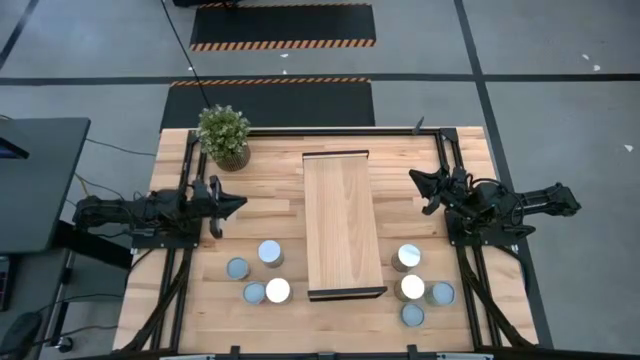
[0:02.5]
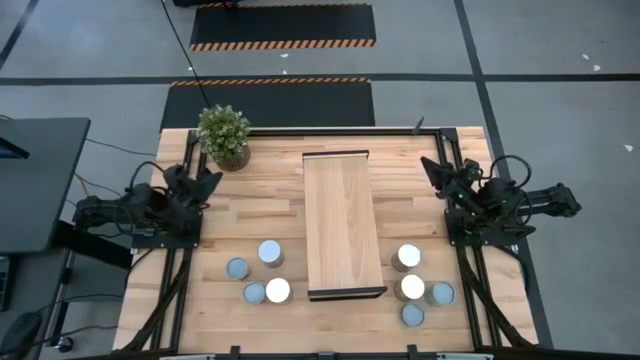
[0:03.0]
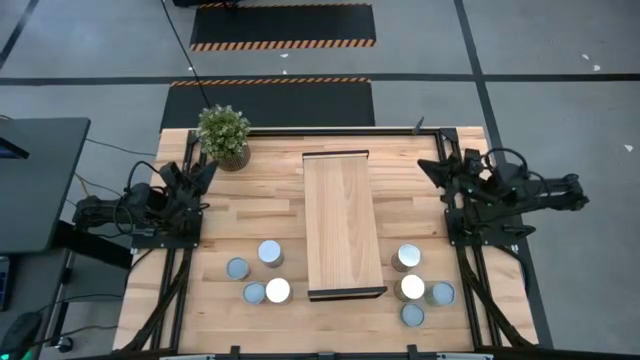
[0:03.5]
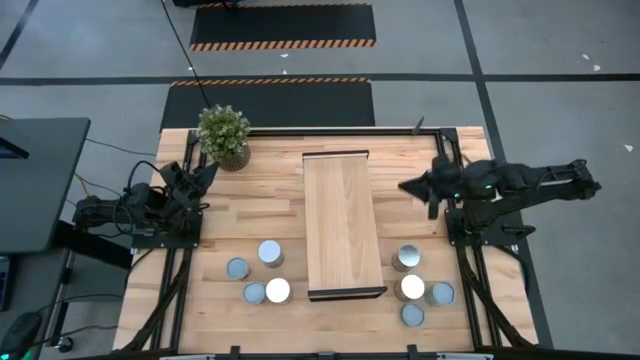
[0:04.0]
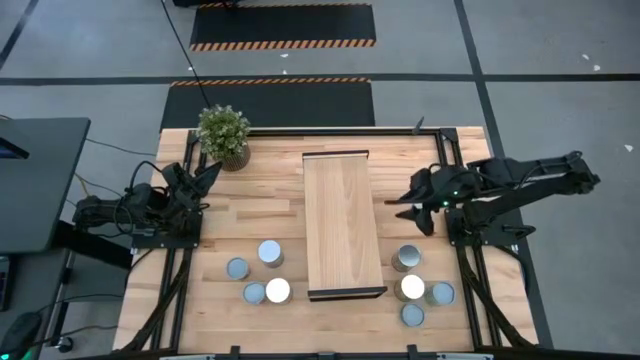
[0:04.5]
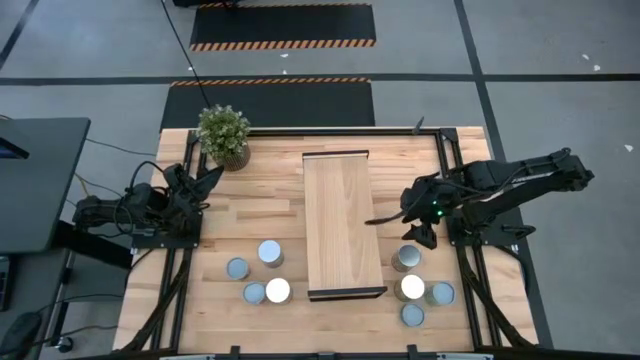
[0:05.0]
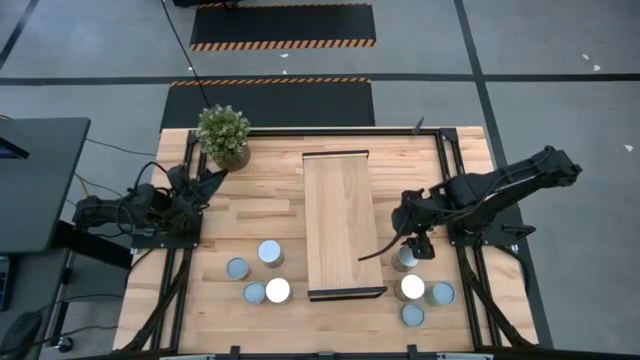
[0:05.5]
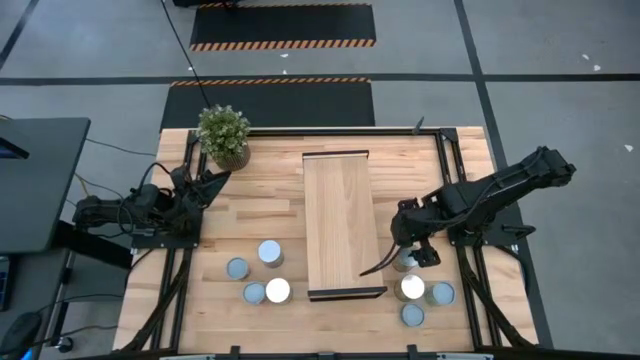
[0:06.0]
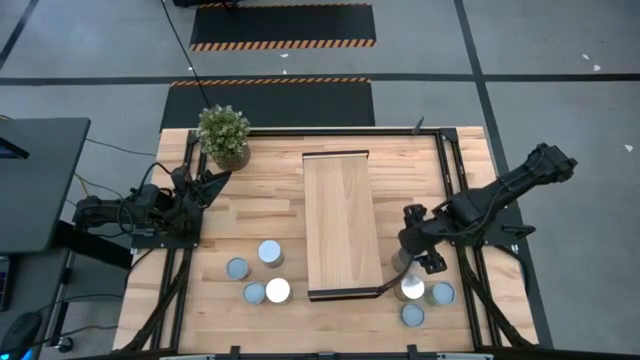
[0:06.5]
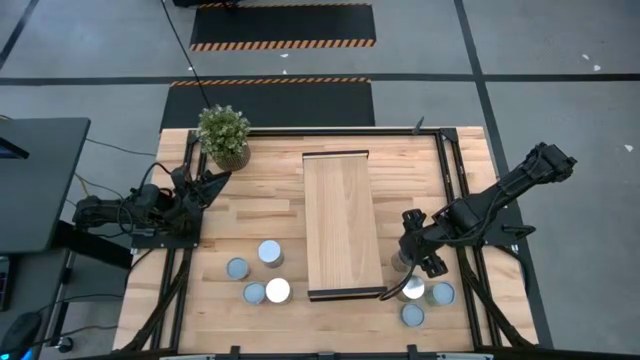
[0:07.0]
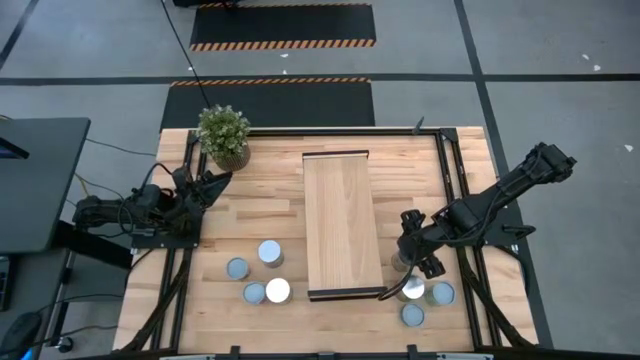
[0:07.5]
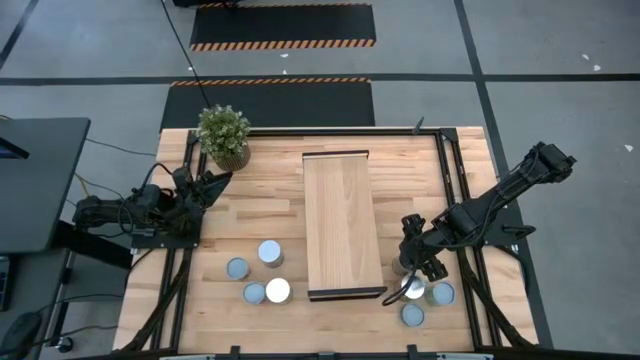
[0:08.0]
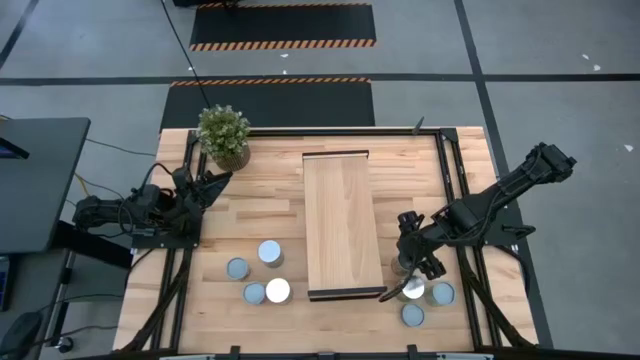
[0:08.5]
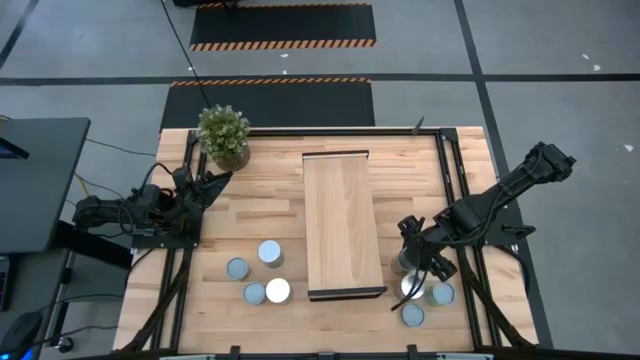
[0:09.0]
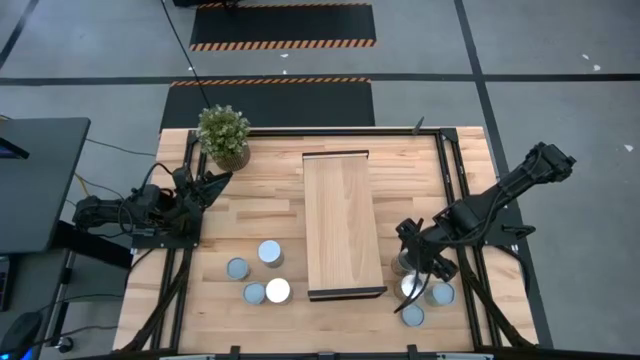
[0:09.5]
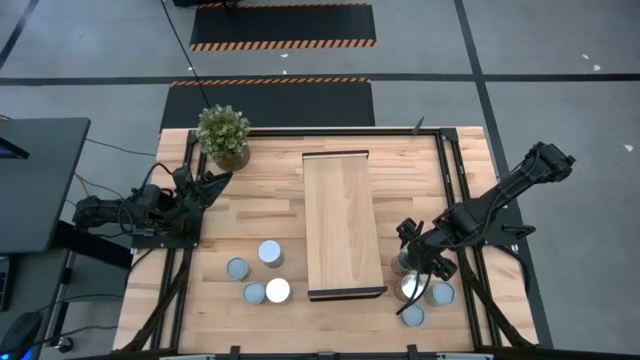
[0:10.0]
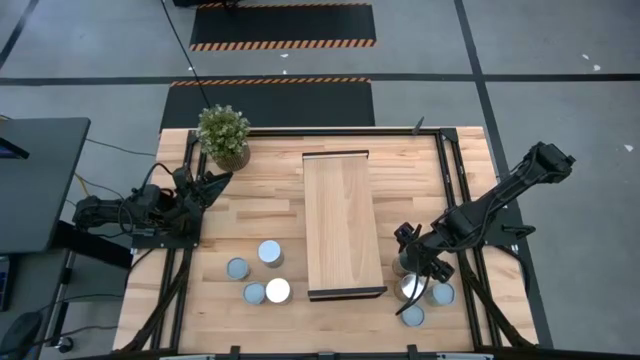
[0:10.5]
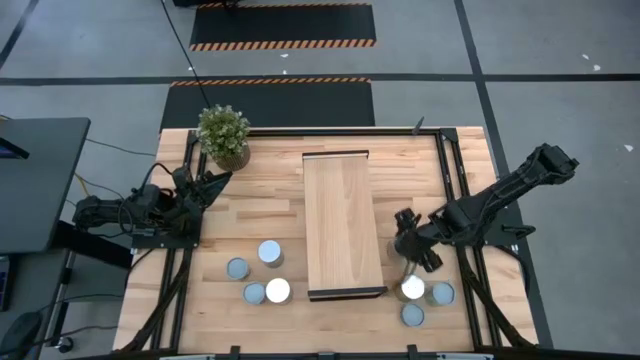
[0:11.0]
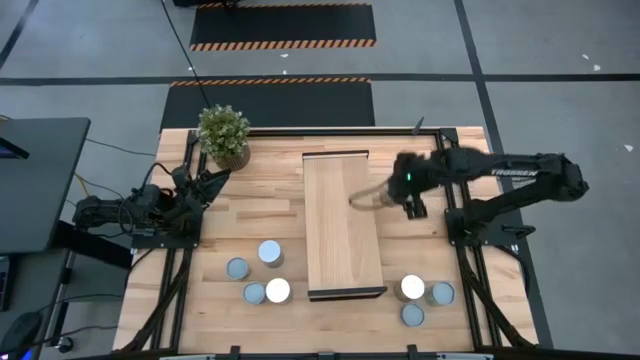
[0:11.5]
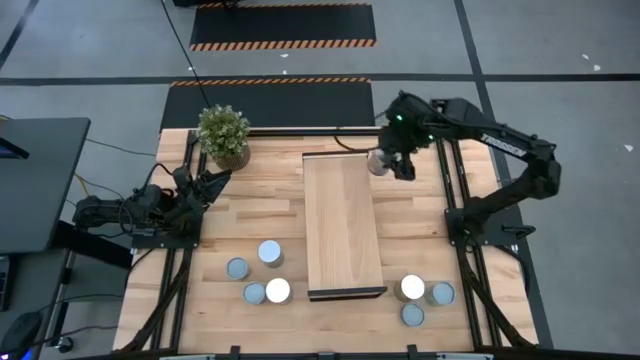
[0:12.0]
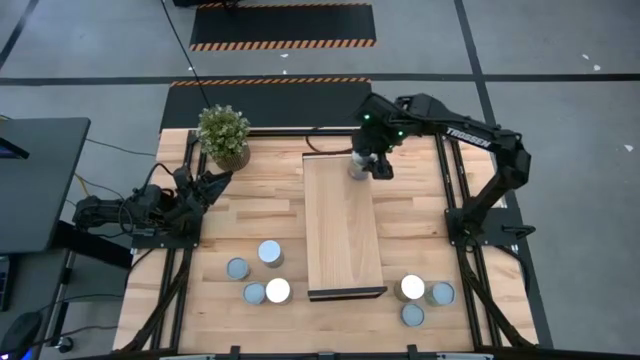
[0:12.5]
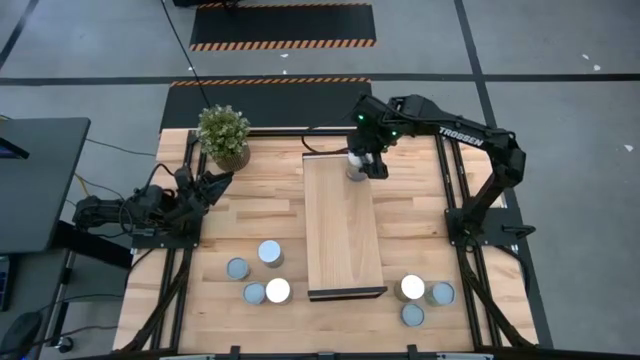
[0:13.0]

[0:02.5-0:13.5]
Task: Pick and place cans onto a shelf
Put the canned peaches on the shelf

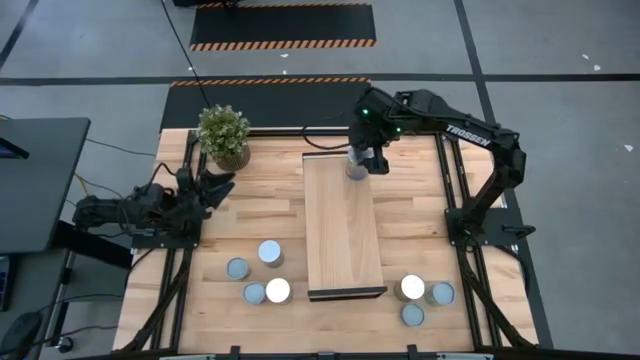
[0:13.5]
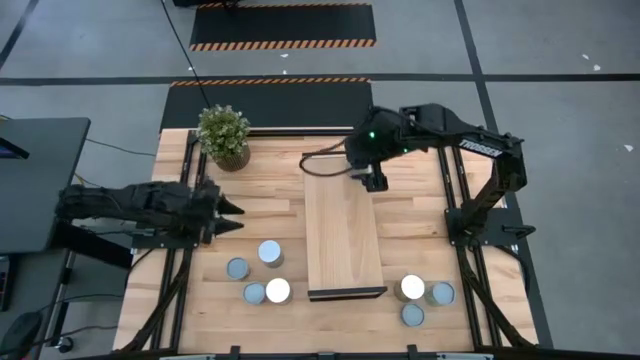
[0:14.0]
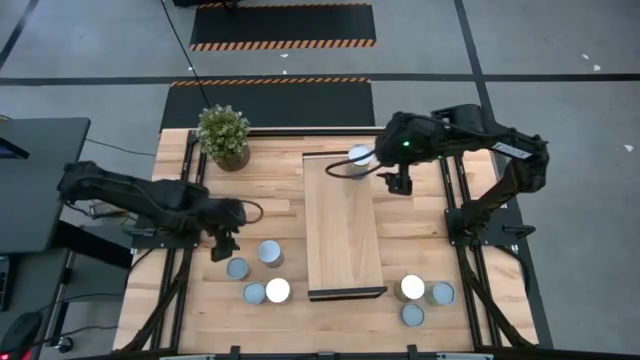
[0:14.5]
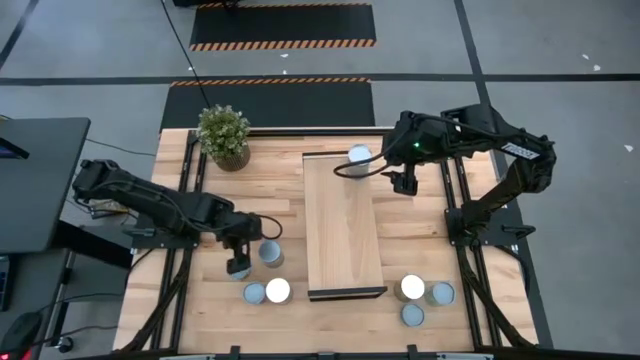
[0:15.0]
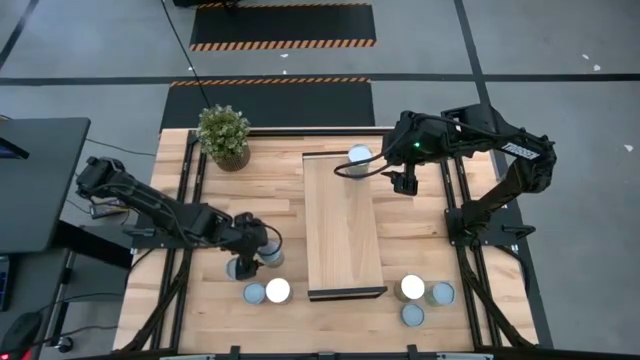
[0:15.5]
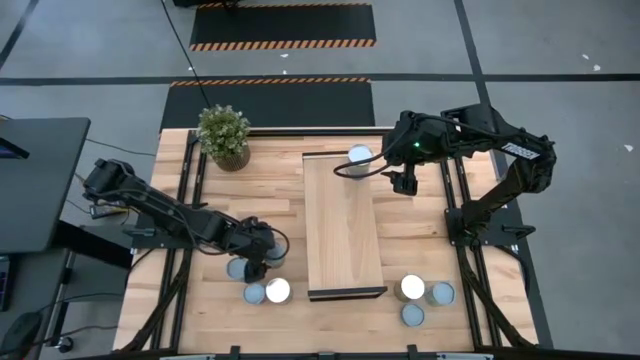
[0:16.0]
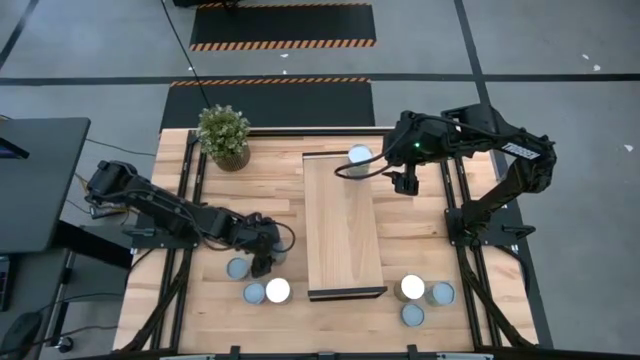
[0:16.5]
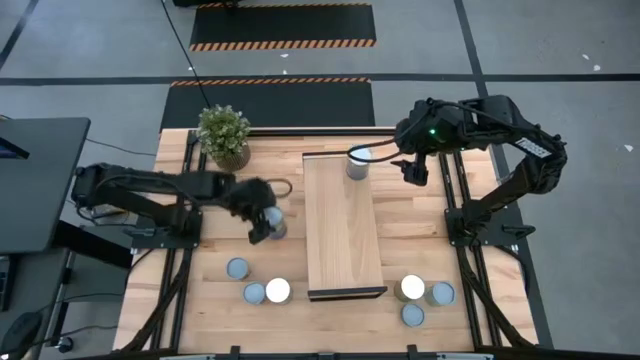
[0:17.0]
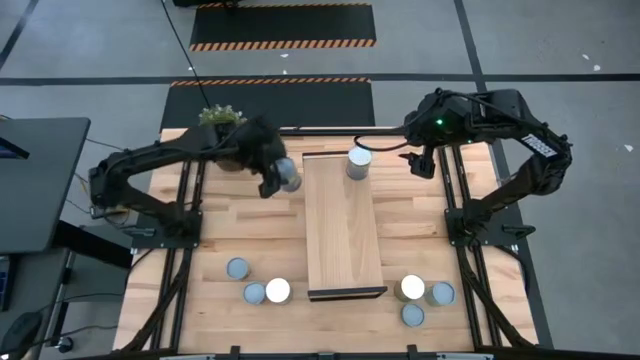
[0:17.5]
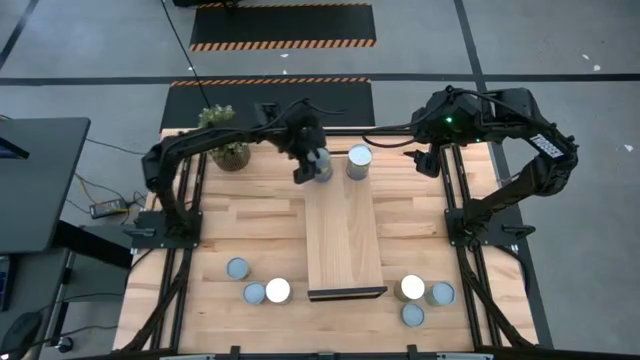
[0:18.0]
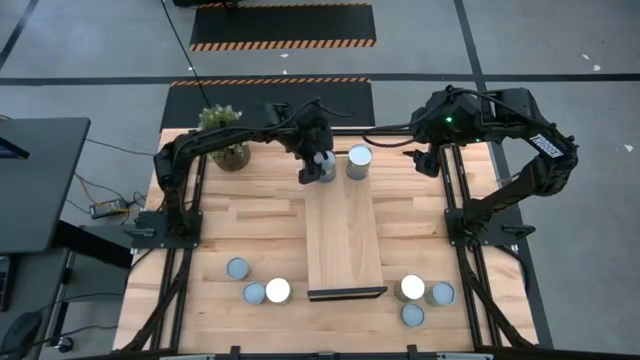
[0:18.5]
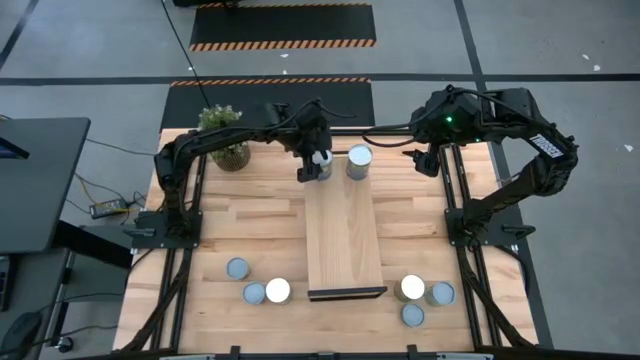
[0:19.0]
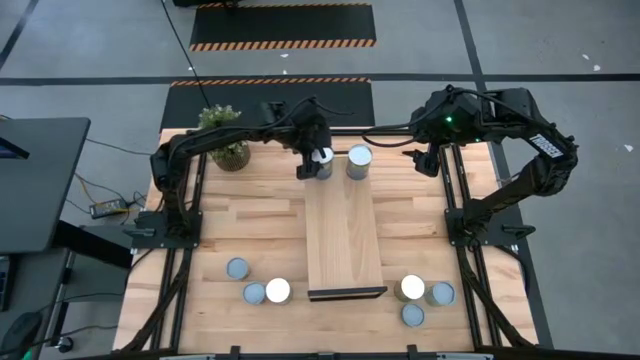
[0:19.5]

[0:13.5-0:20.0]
Put the large canned peas on the shelf

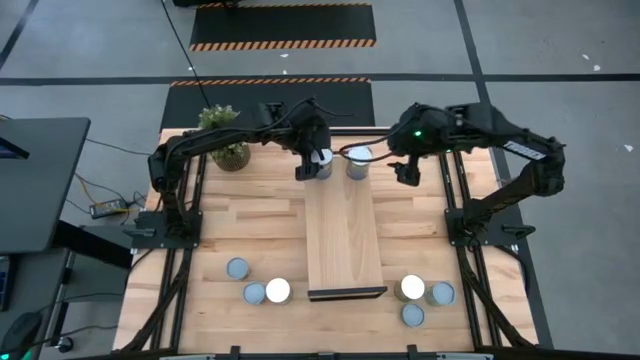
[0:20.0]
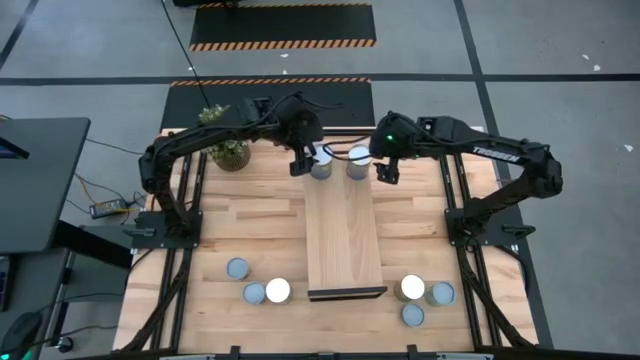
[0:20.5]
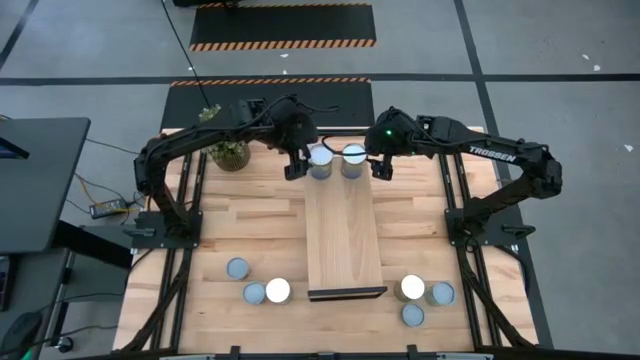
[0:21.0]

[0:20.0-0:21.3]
Adjust the canned peaches on the shelf

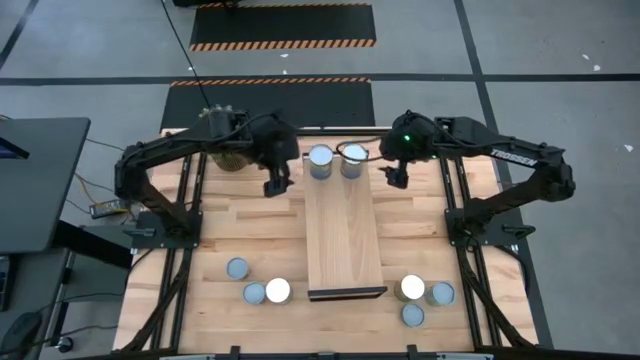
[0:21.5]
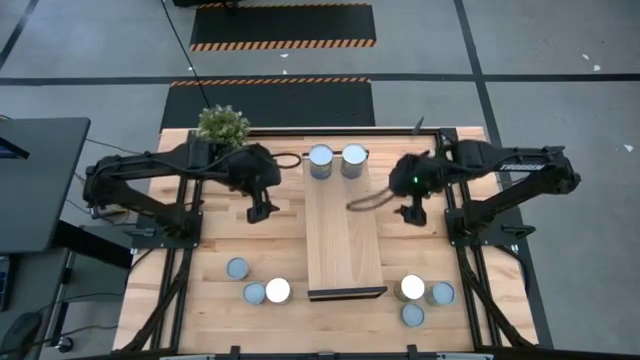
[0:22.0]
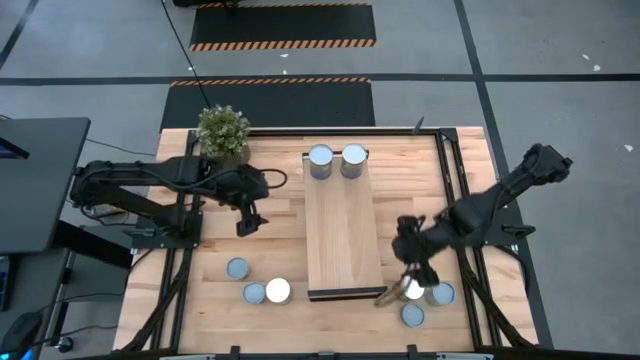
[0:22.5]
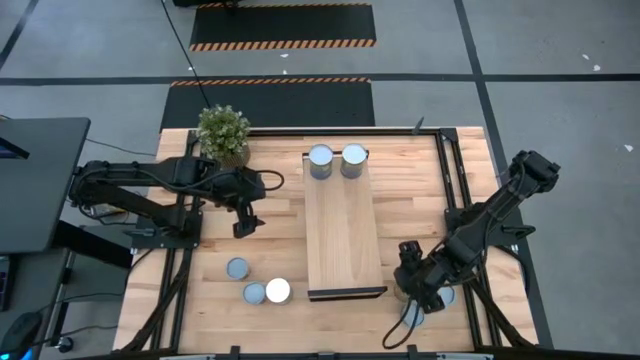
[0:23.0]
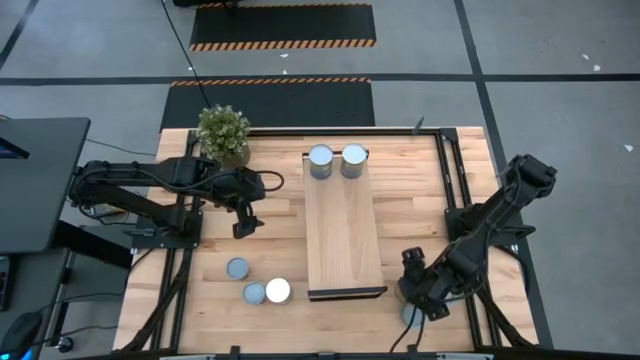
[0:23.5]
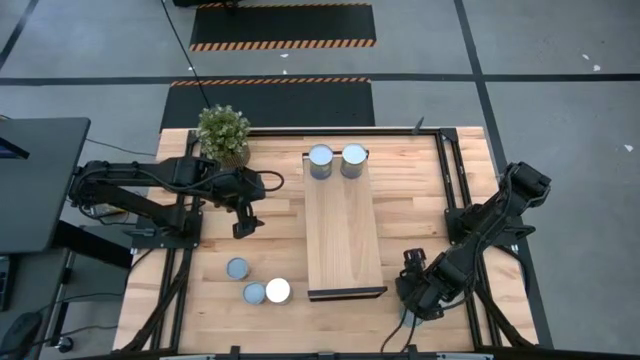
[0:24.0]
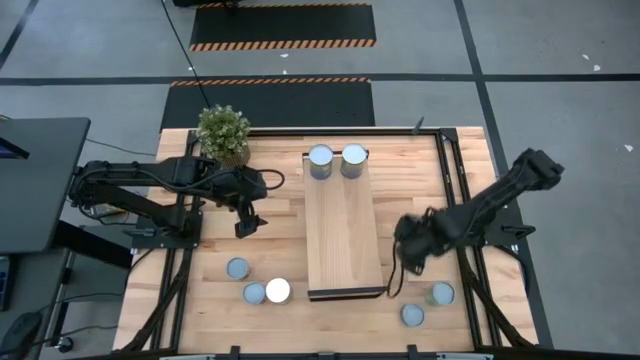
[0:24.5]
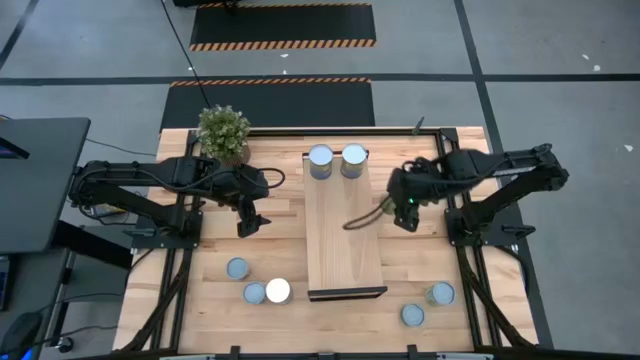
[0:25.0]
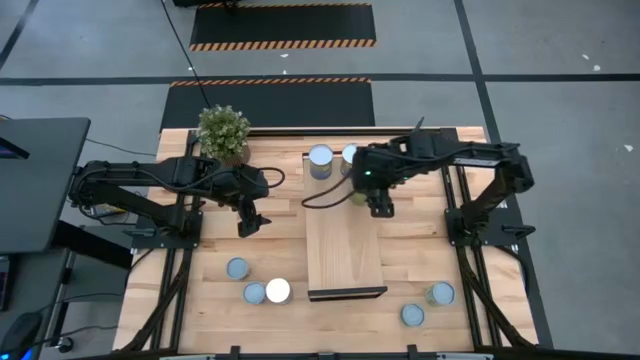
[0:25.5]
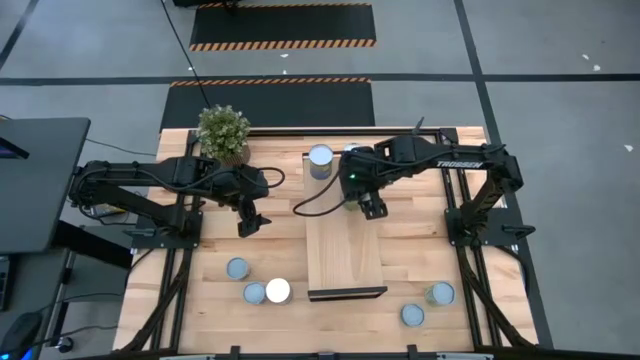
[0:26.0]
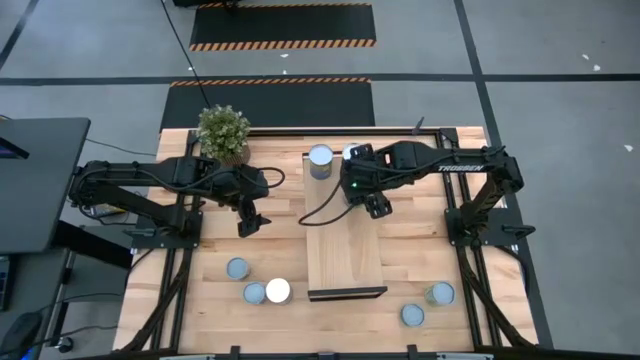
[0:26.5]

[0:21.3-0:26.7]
Put the canned oranges on the shelf
